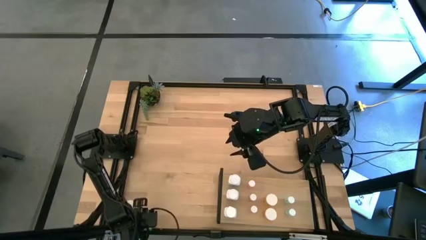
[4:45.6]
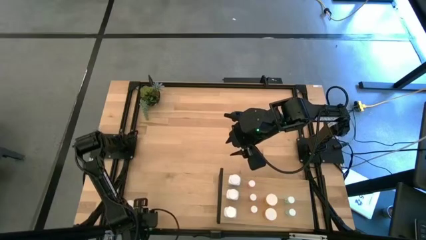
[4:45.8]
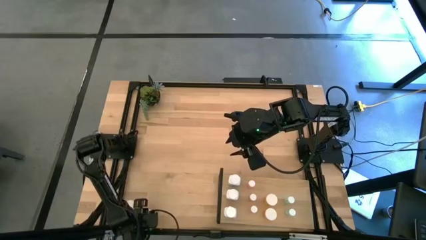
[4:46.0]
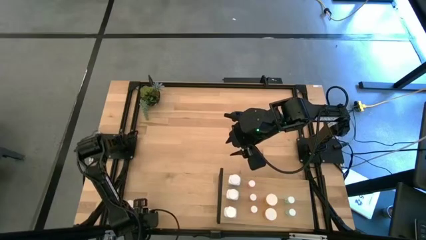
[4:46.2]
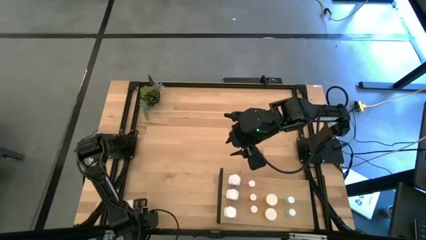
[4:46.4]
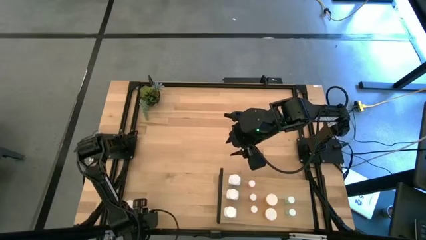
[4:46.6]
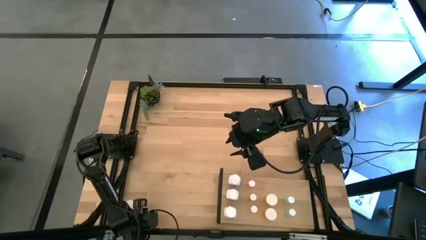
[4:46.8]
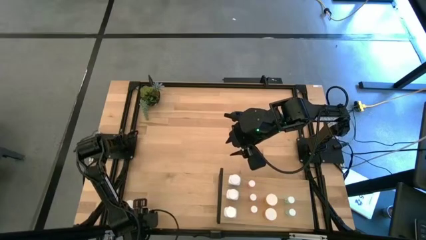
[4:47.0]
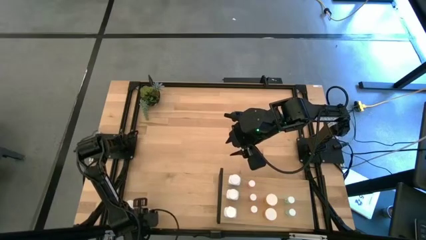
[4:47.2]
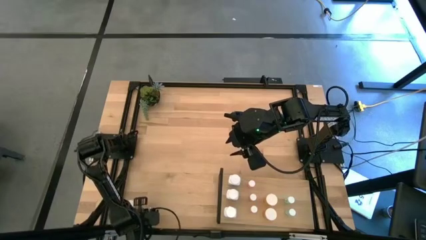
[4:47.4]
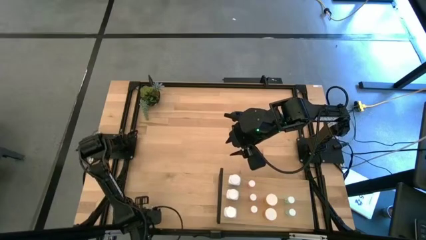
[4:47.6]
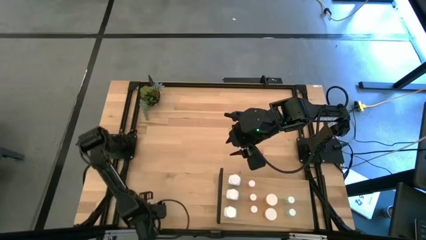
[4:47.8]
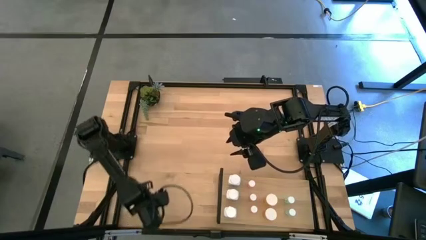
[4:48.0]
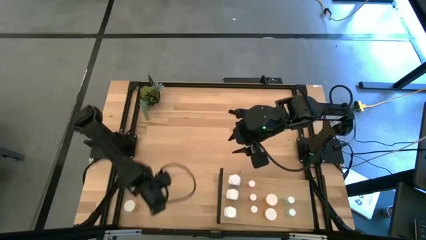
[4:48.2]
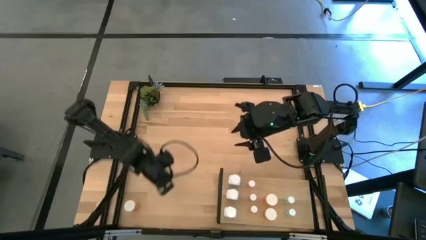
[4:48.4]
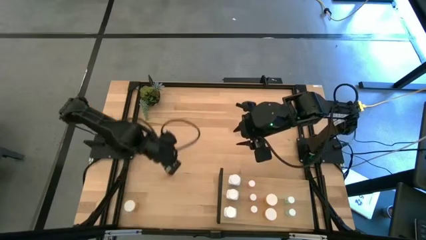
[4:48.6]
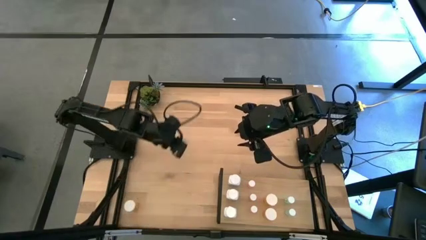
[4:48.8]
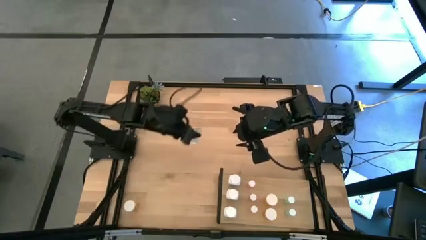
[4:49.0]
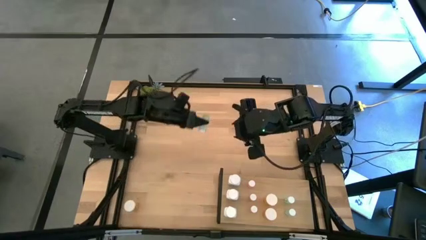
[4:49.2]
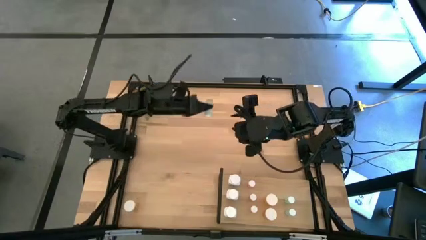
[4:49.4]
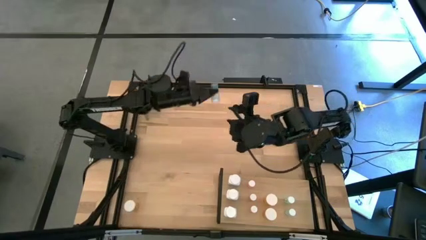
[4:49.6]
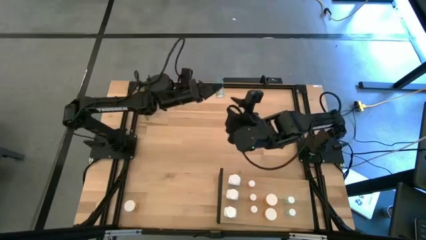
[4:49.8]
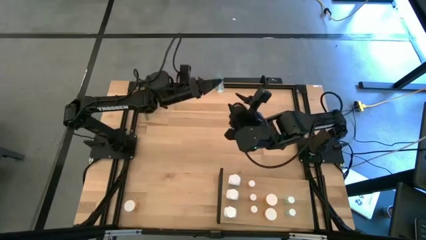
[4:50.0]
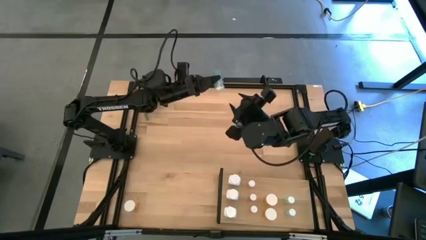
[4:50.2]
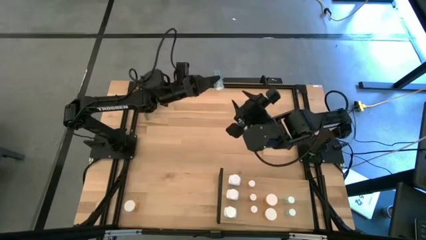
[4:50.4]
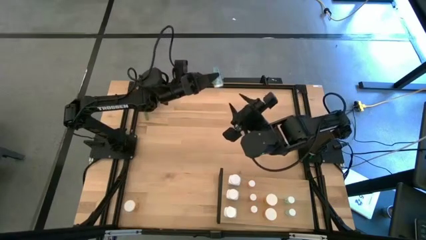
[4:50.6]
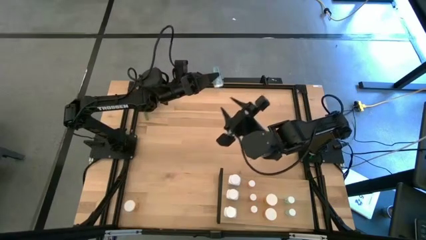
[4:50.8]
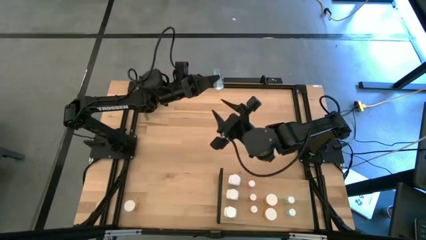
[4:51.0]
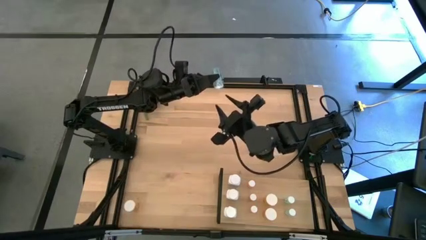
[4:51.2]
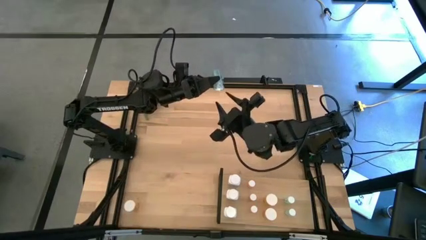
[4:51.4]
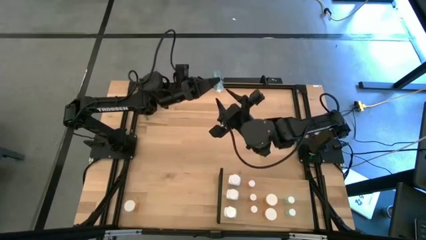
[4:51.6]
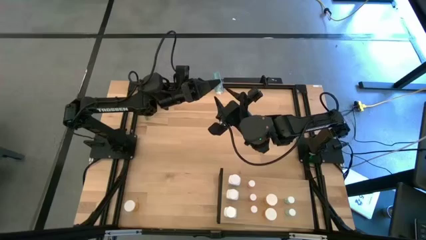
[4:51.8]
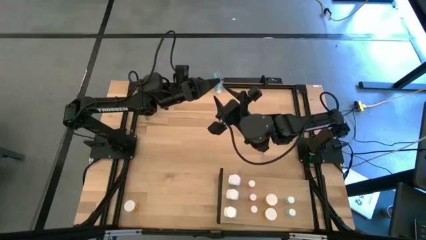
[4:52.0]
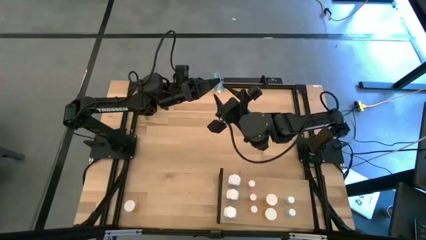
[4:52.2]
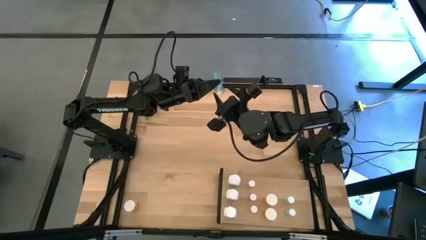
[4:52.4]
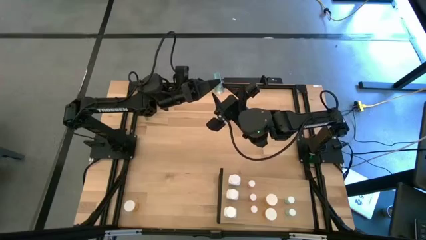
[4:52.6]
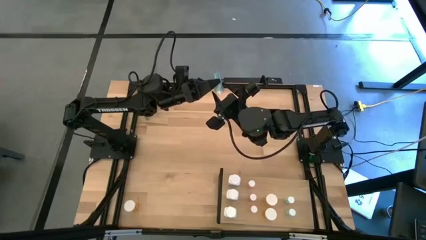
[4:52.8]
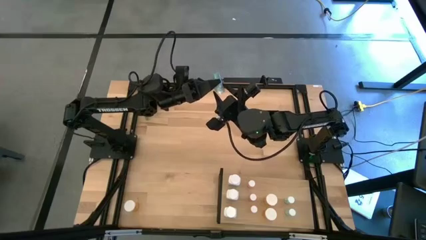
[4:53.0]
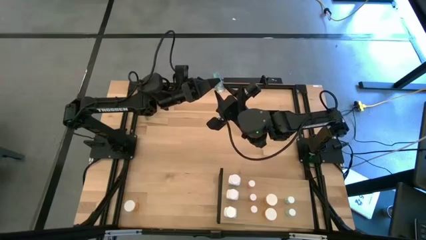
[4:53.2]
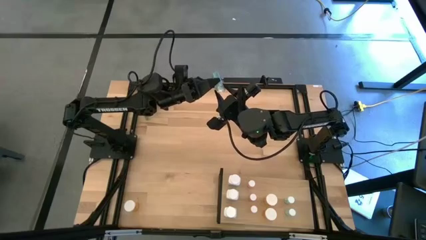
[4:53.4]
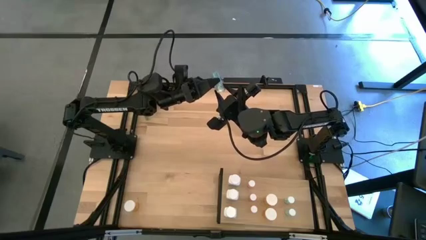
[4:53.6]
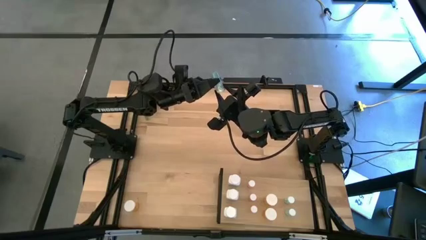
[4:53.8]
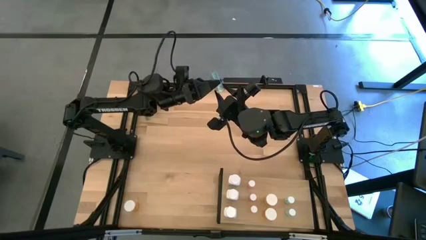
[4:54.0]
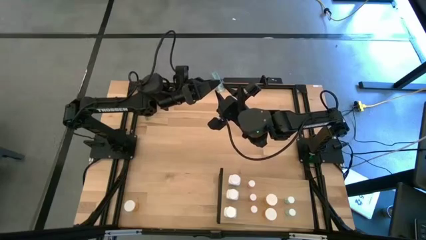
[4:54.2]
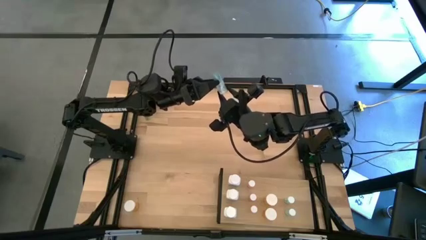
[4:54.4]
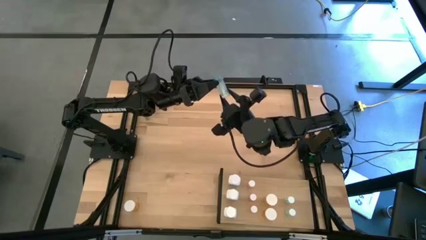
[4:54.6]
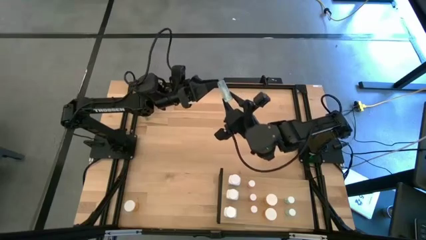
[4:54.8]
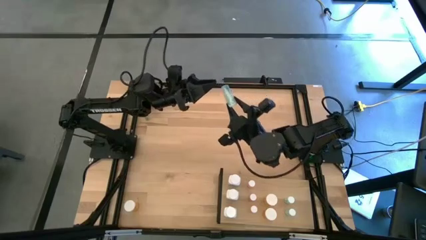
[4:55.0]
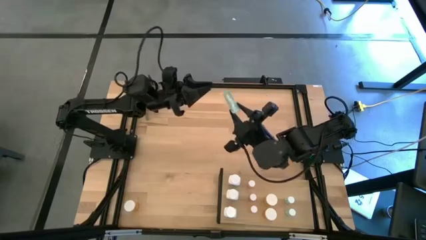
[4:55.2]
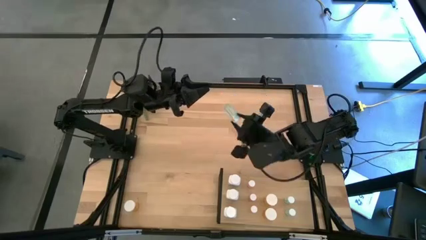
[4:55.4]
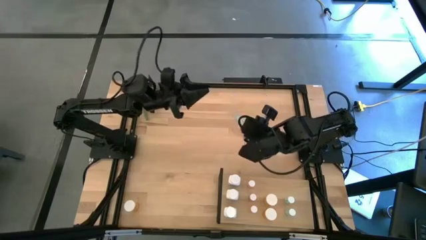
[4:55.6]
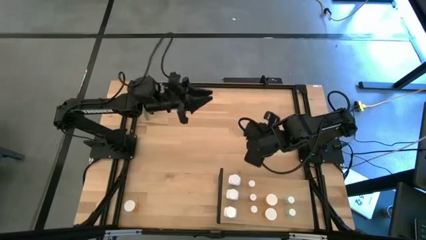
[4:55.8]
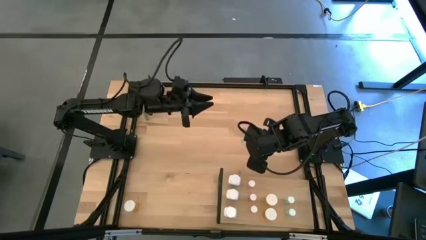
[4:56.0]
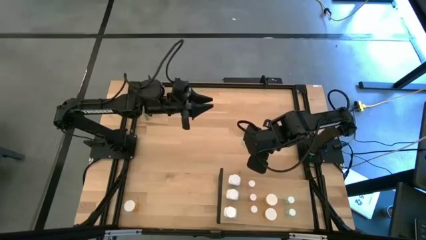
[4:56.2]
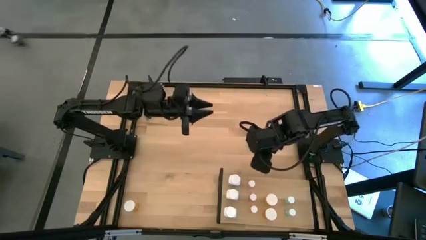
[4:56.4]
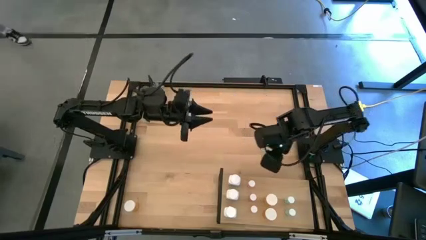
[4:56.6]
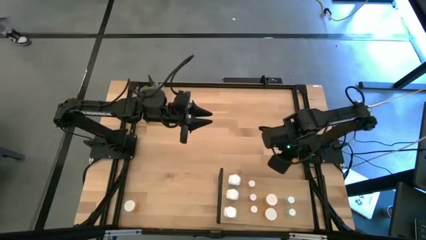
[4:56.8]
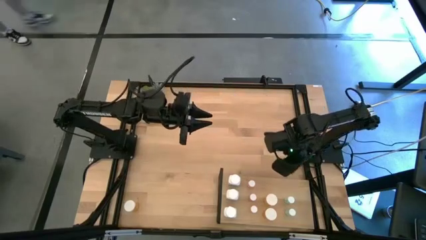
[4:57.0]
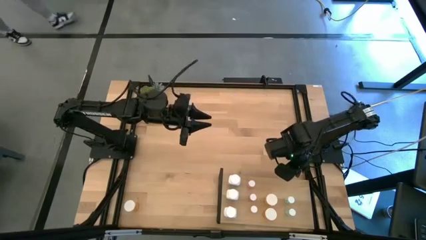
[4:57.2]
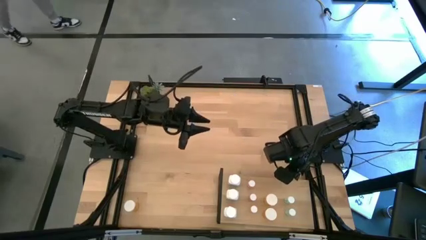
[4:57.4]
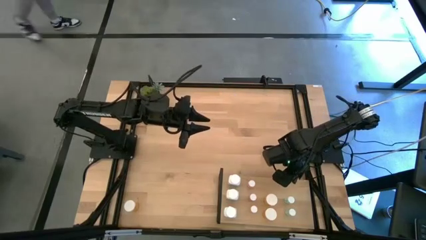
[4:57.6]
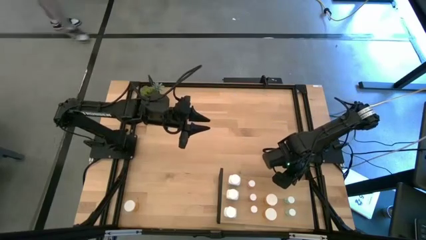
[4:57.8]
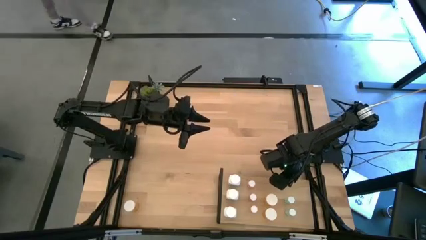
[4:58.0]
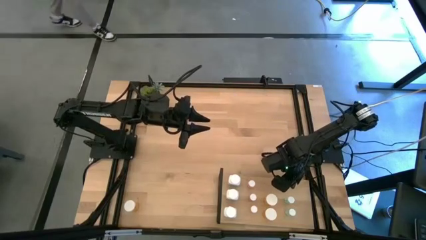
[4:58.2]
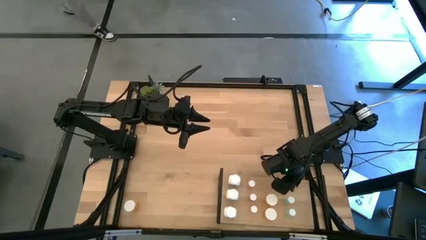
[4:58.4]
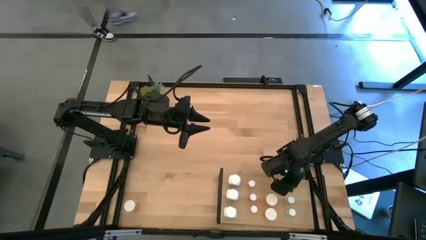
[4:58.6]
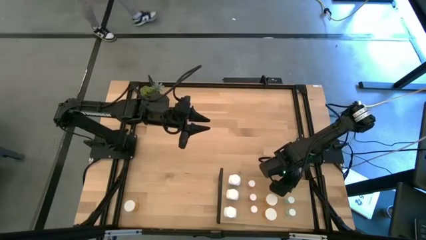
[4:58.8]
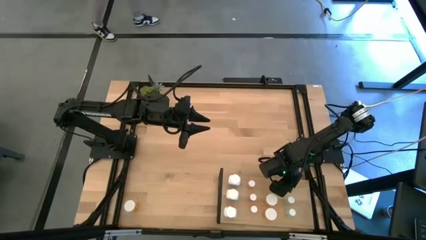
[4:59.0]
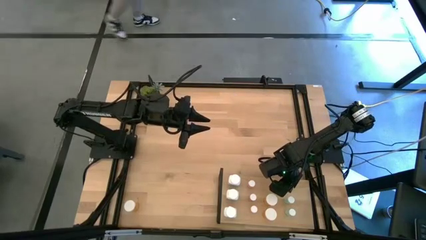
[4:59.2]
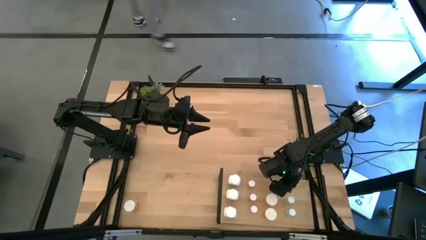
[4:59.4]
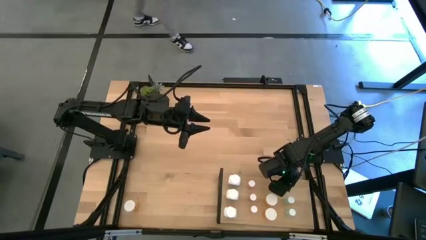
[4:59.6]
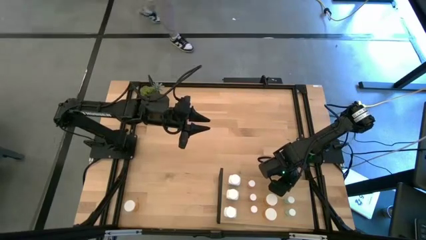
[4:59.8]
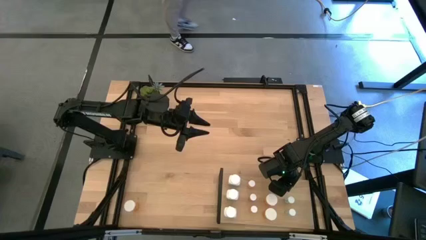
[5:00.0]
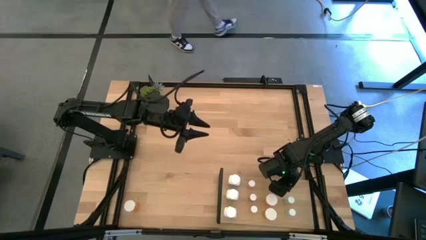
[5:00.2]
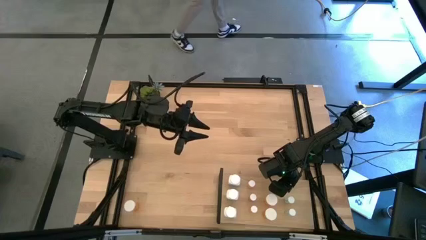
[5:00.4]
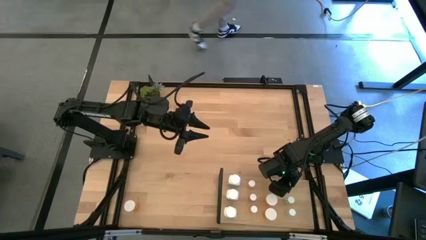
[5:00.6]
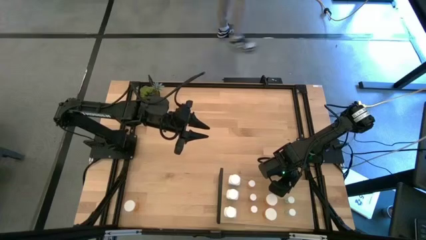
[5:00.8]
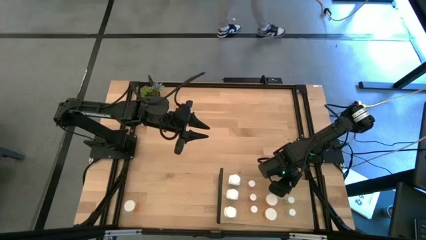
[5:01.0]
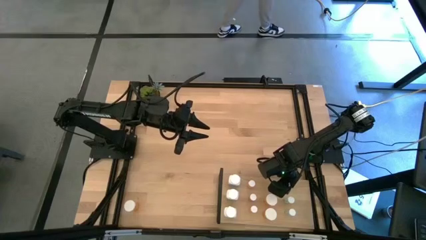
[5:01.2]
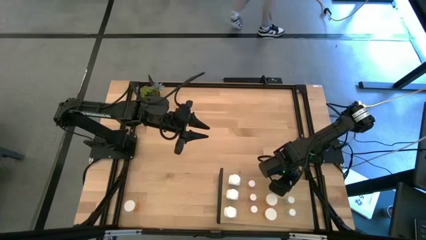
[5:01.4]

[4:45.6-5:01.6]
Task: Pick and place medicine bottles onto shelf by color
Put the bottom left blue pill bottle on the shelf
